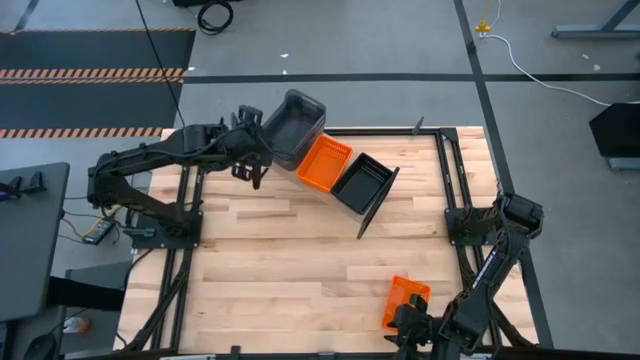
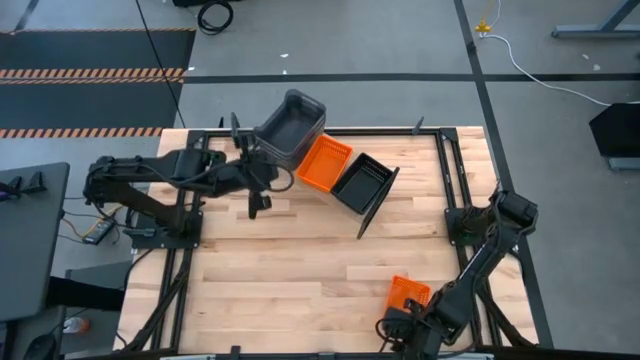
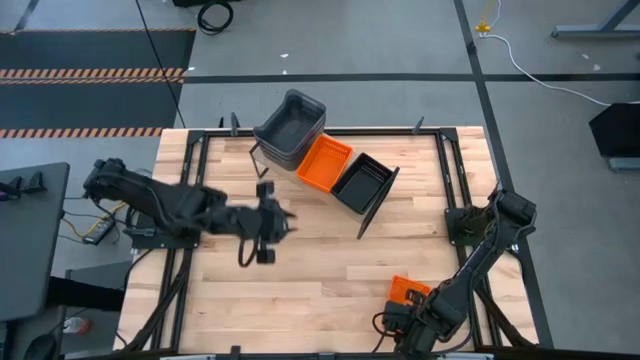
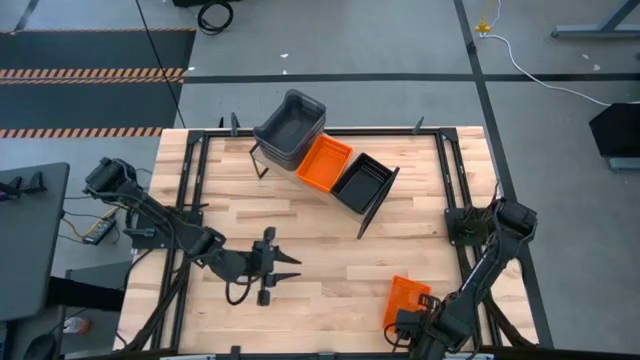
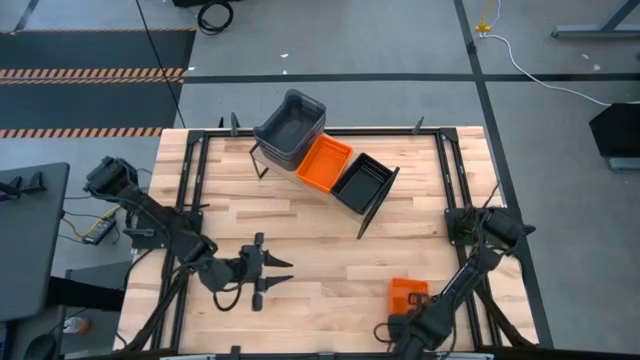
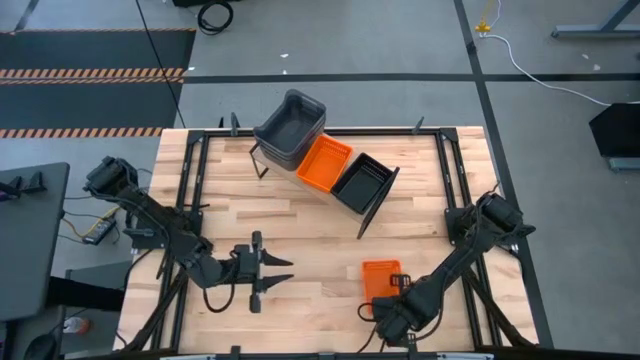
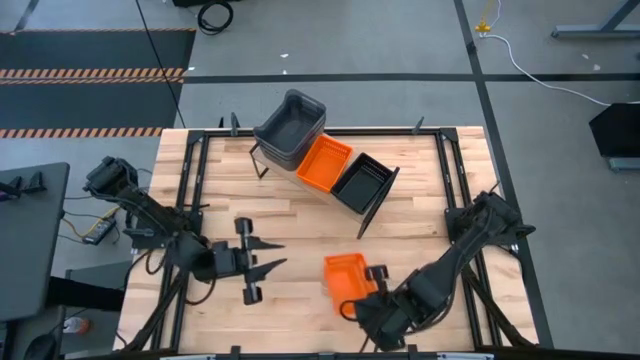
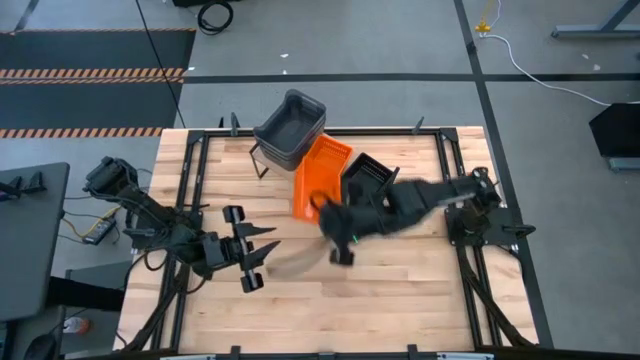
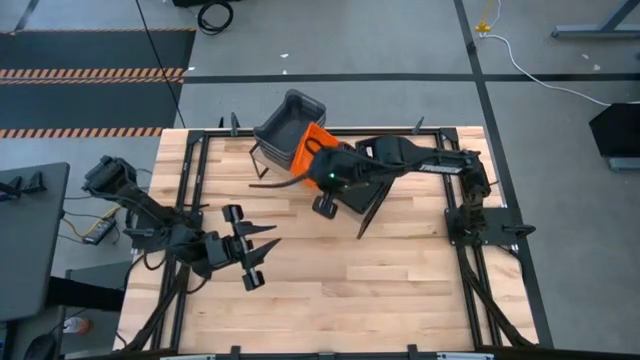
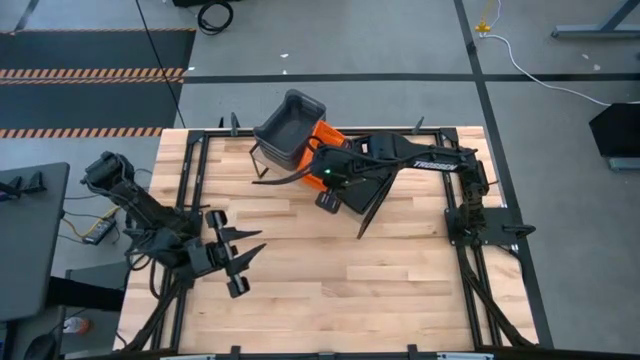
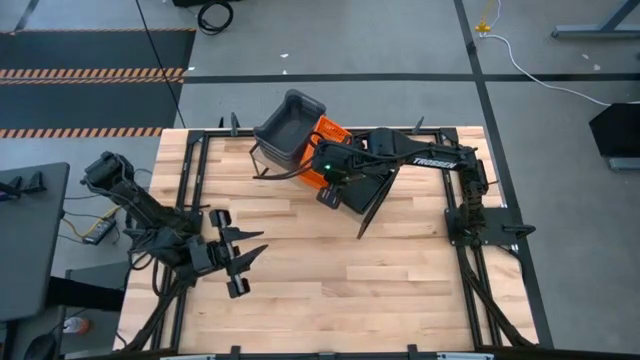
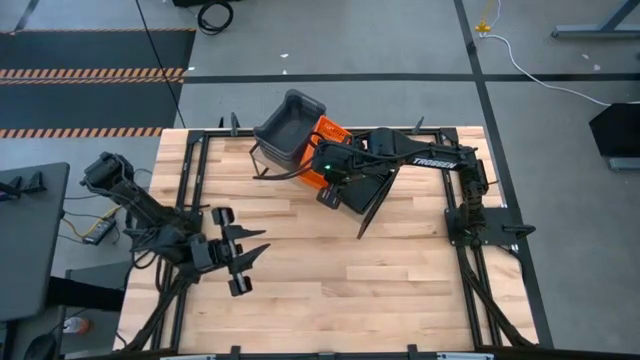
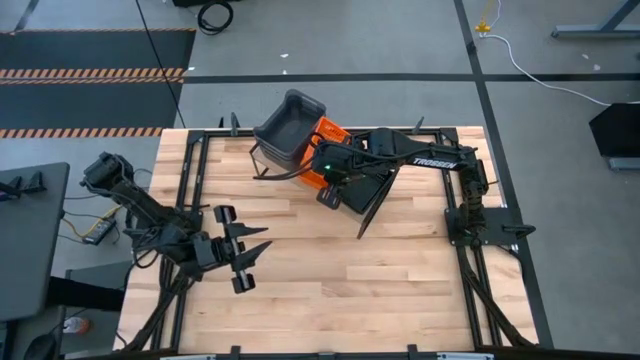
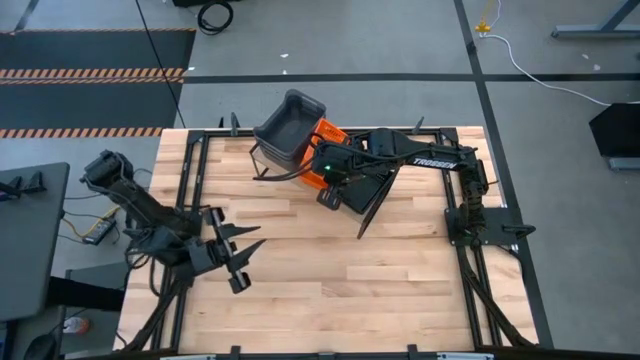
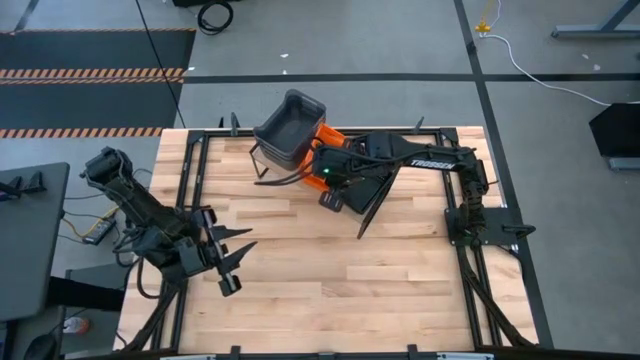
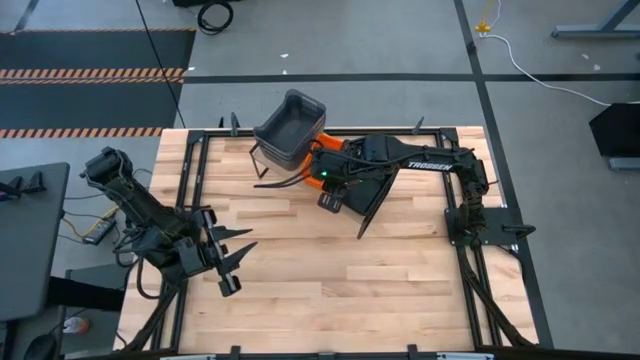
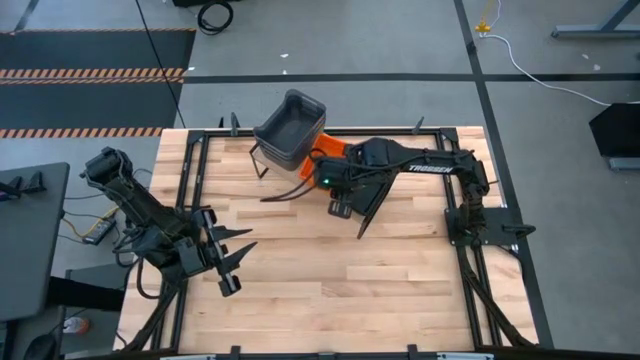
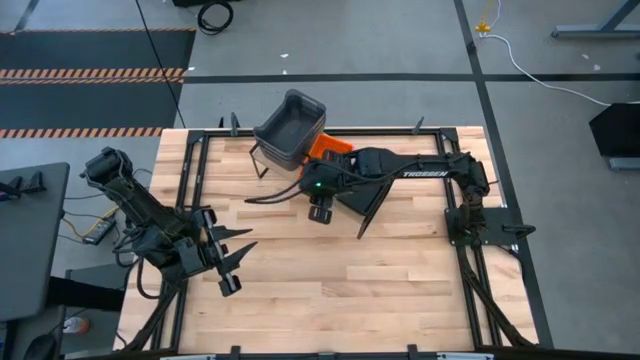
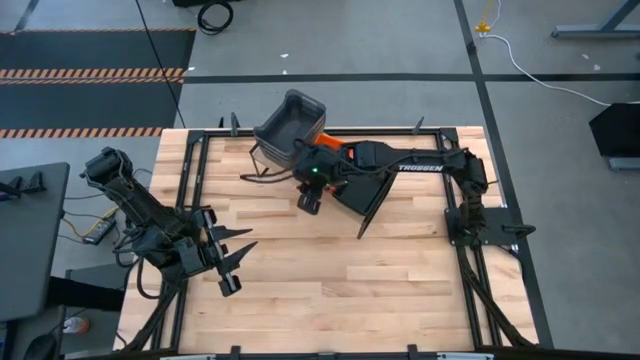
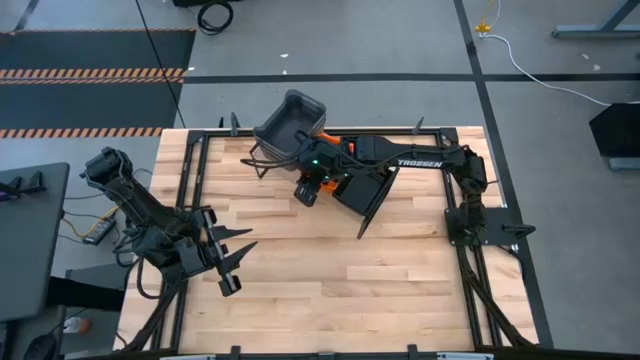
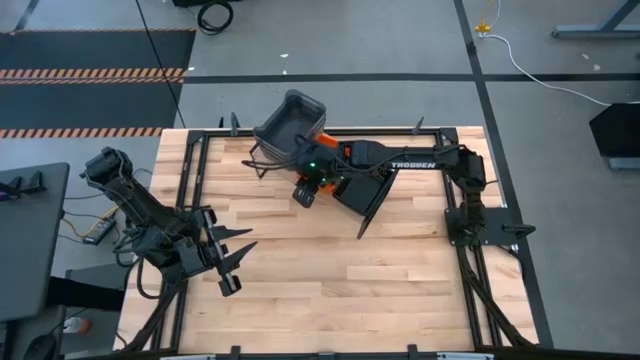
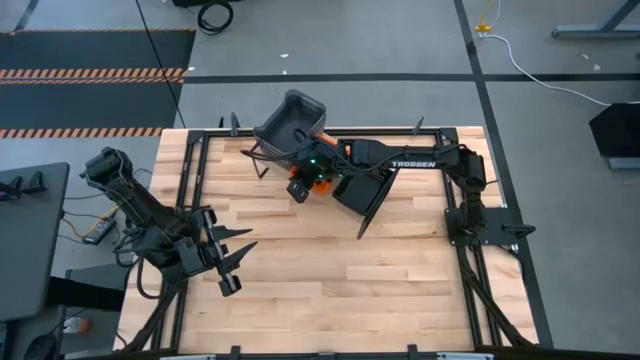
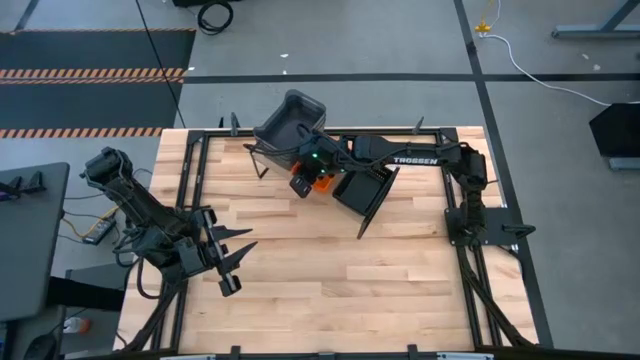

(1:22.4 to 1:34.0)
Task: Stack baskets on shelf by color
Stack the orange basket on top of the other orange baskets on the shelf

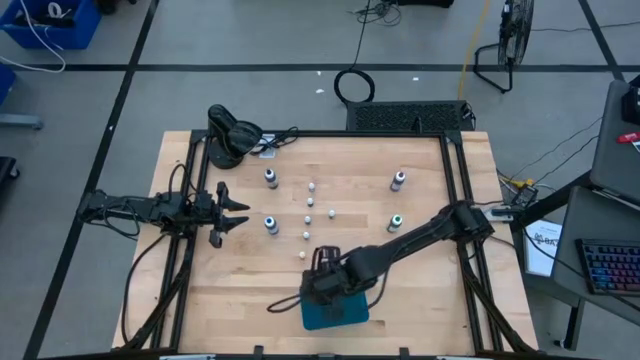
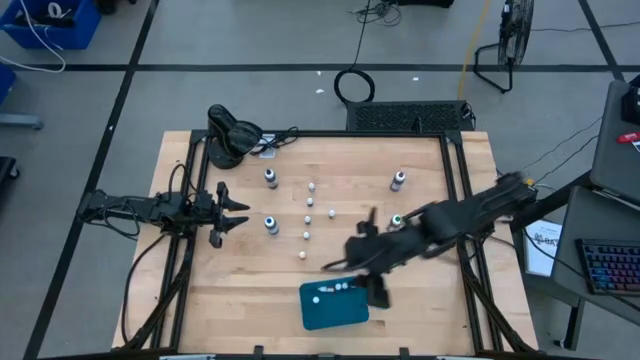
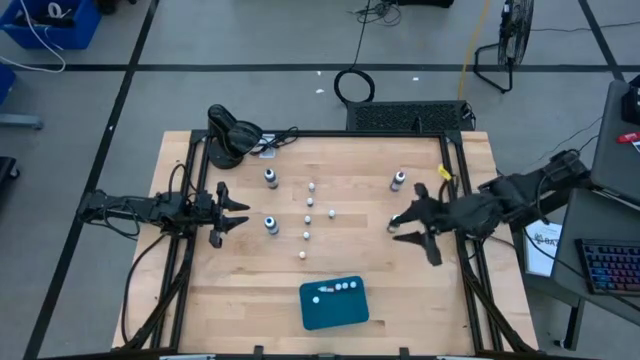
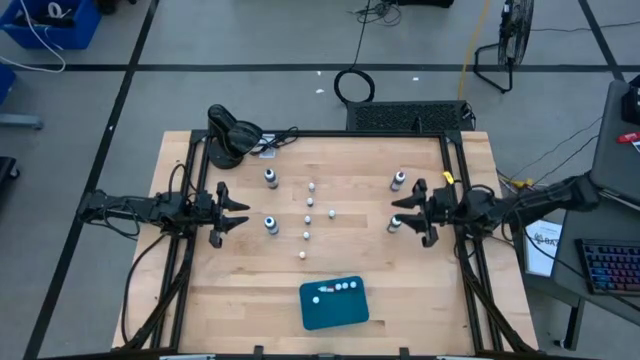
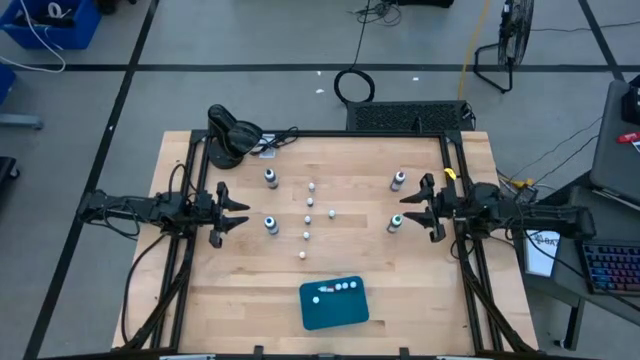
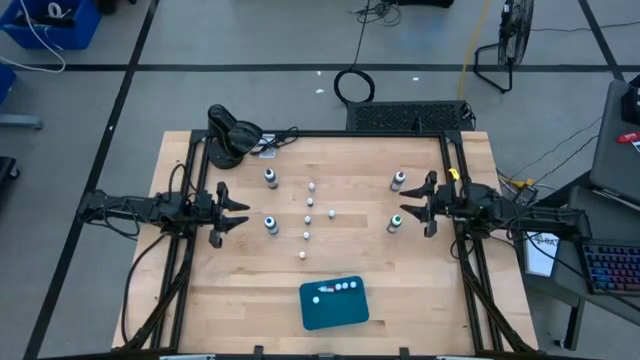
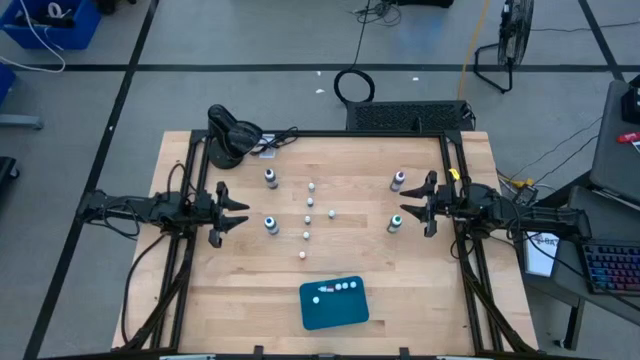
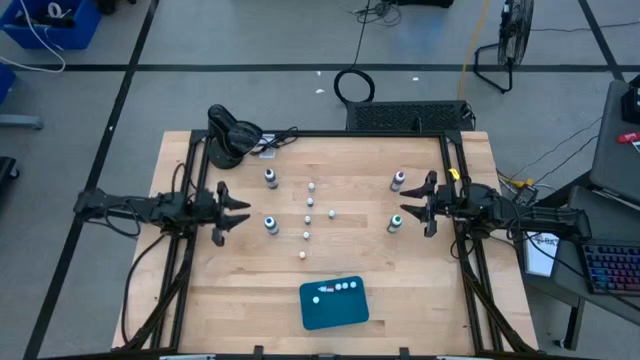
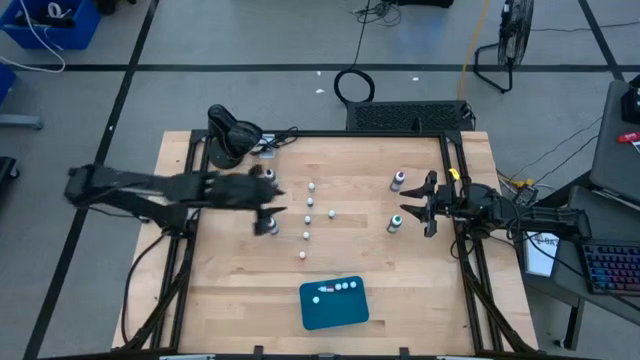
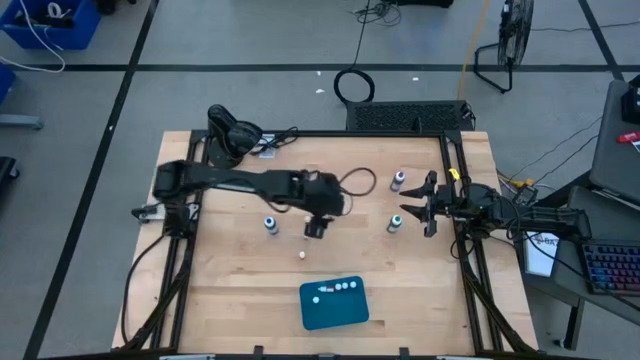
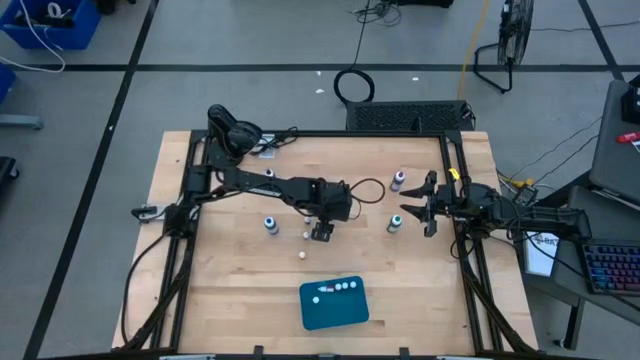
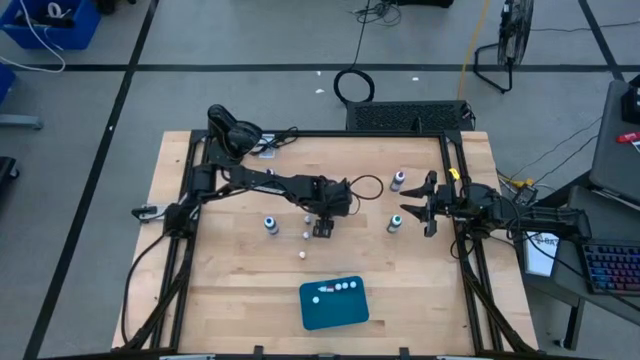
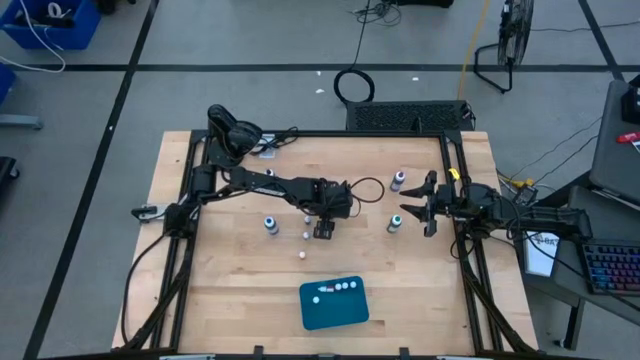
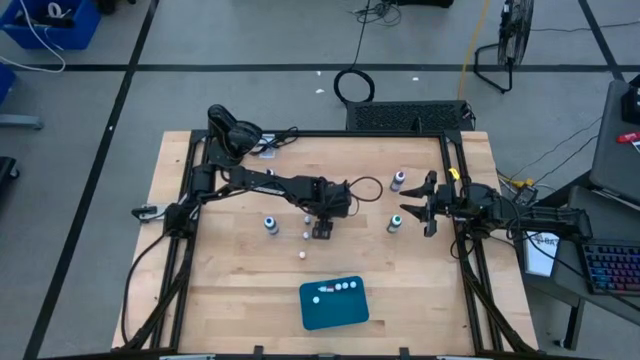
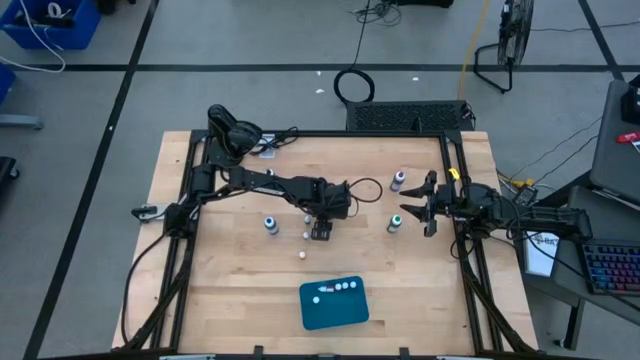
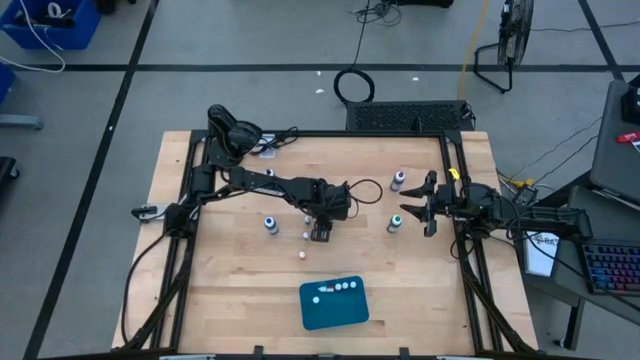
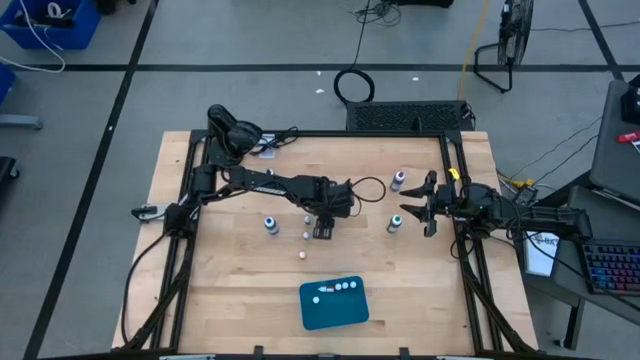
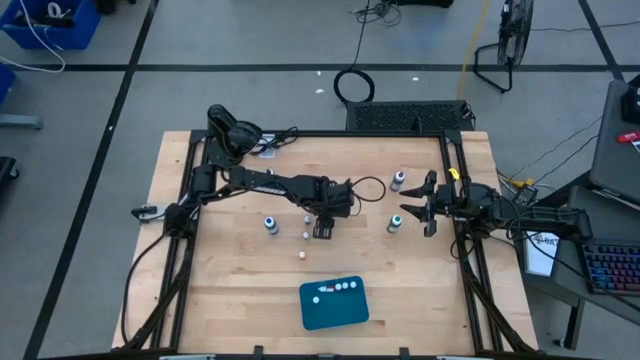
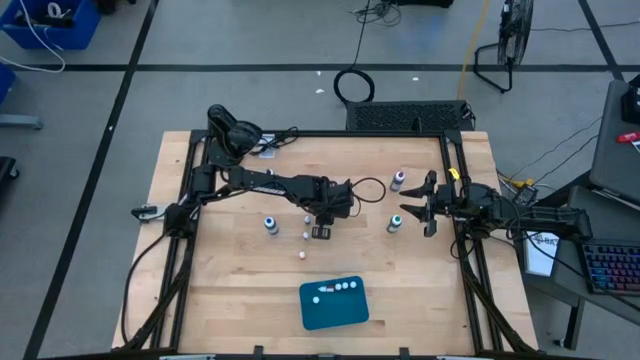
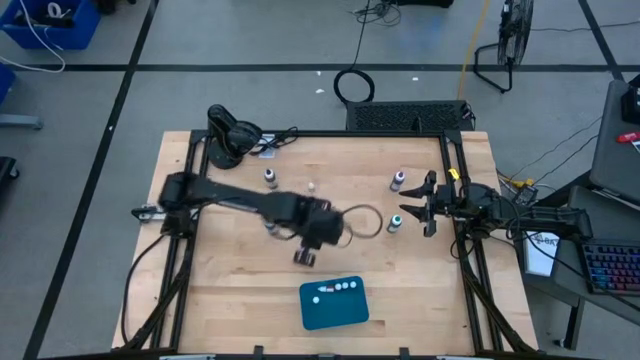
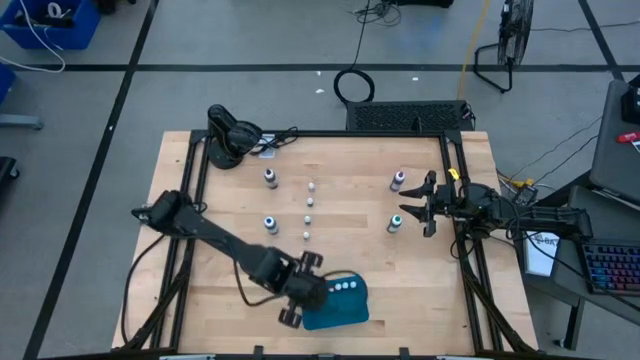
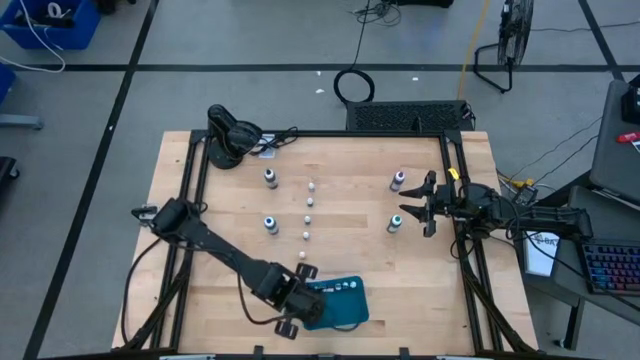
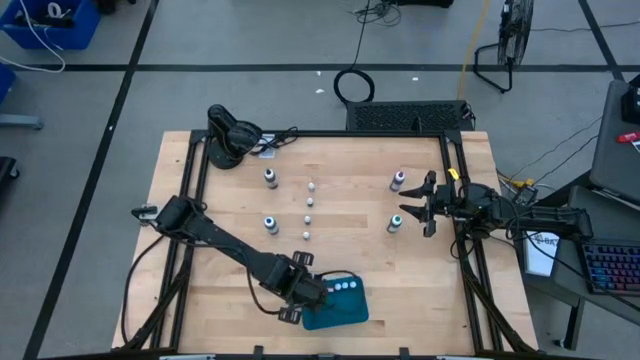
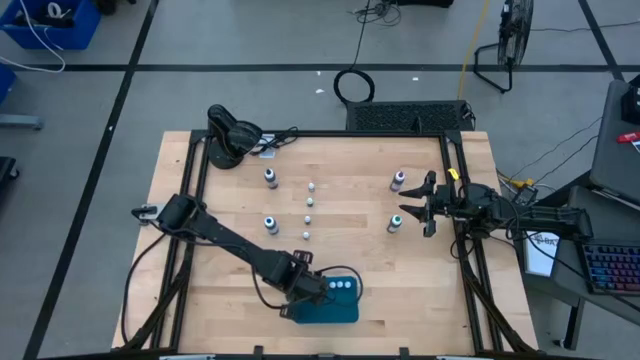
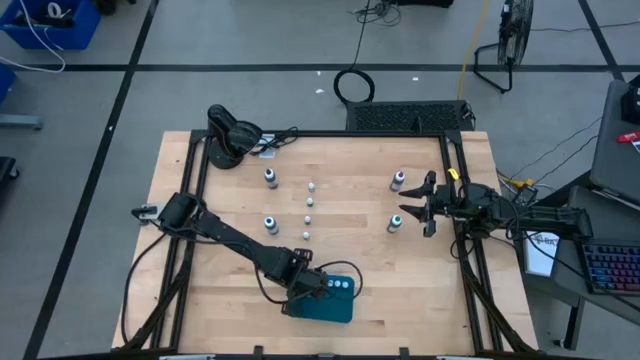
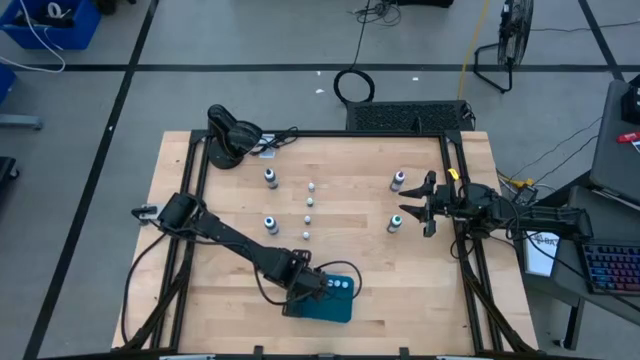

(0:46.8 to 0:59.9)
Task: Pick & Place food coloring
Put the small blue coloring bottle into the blue bin
